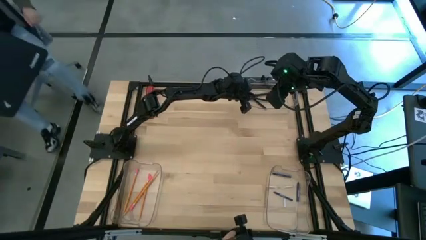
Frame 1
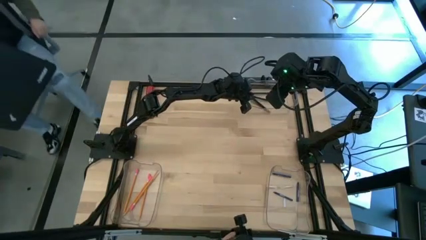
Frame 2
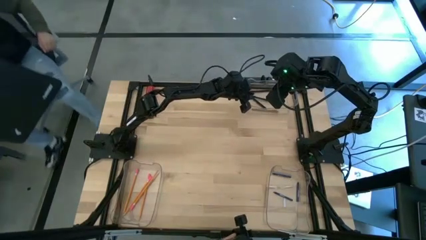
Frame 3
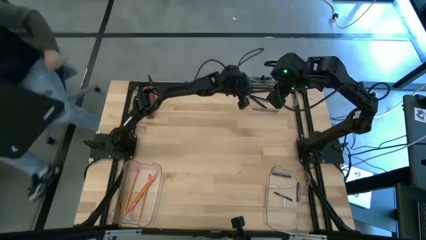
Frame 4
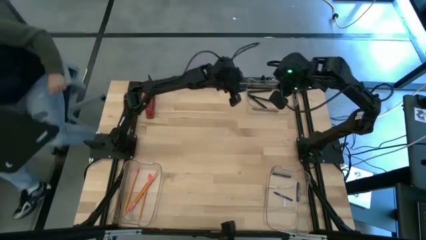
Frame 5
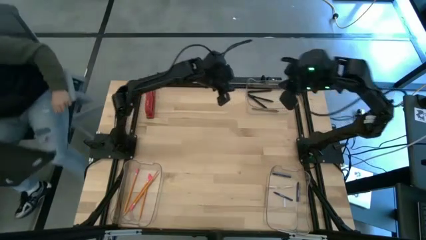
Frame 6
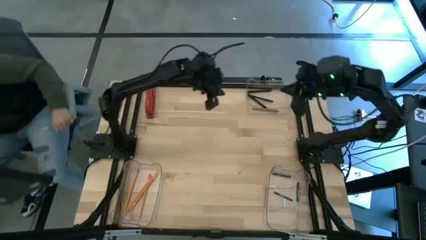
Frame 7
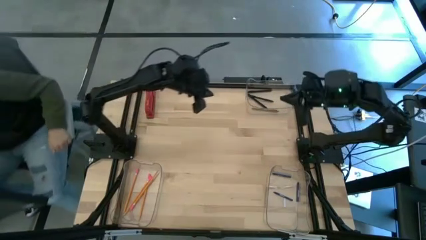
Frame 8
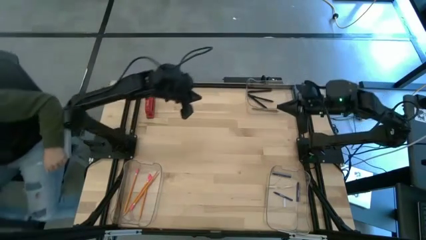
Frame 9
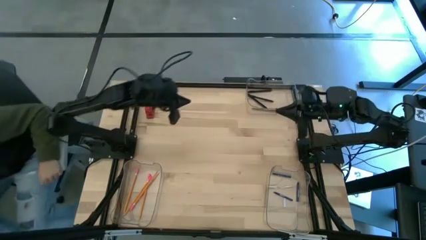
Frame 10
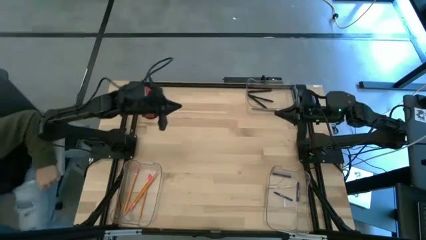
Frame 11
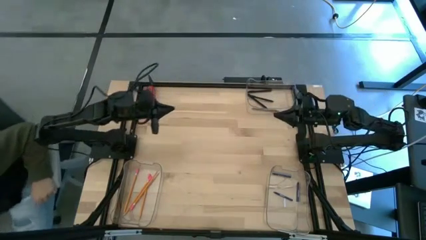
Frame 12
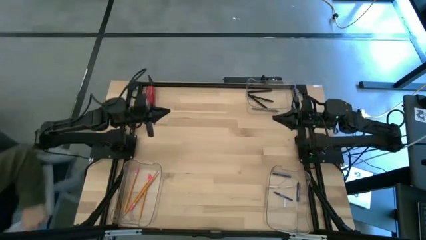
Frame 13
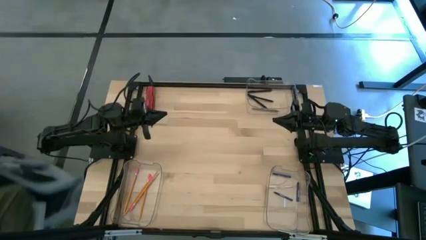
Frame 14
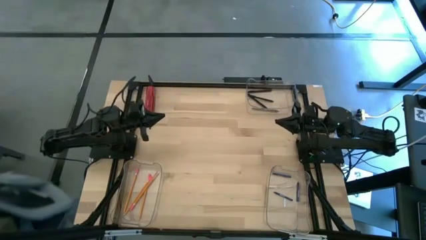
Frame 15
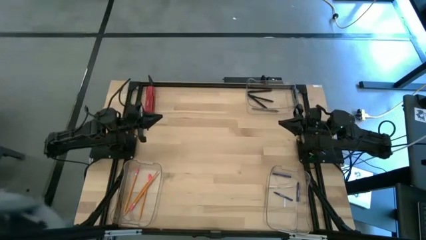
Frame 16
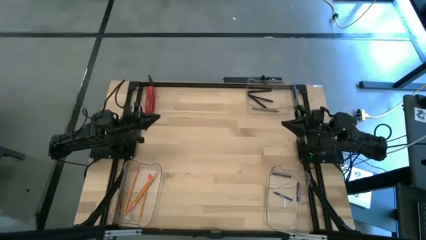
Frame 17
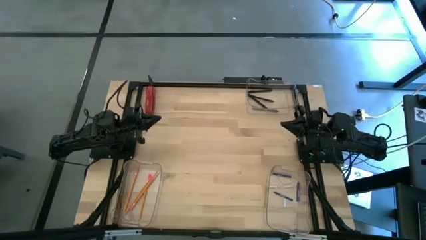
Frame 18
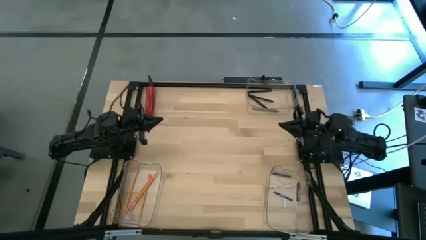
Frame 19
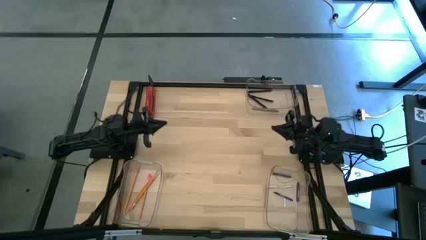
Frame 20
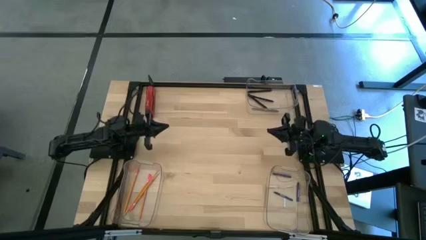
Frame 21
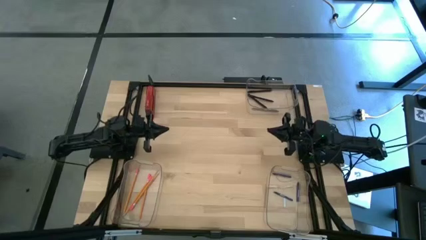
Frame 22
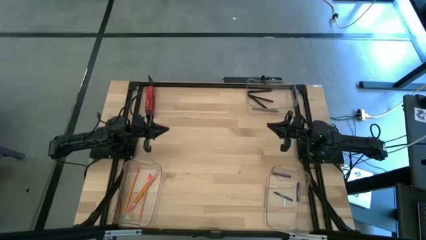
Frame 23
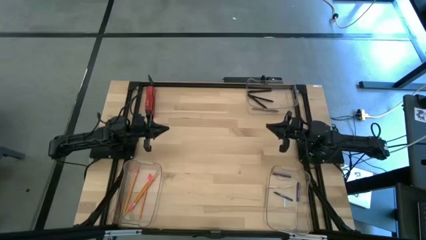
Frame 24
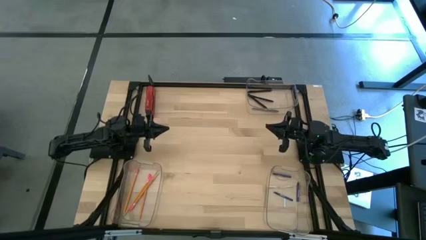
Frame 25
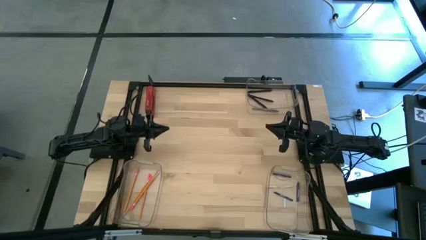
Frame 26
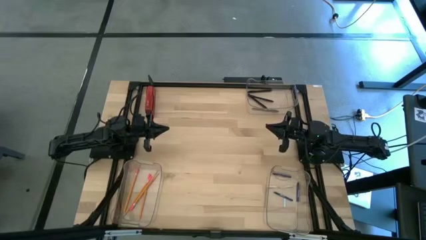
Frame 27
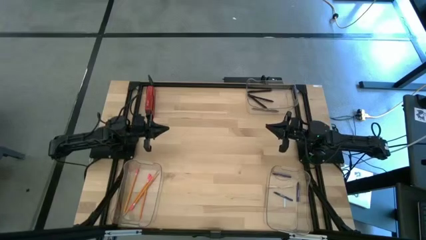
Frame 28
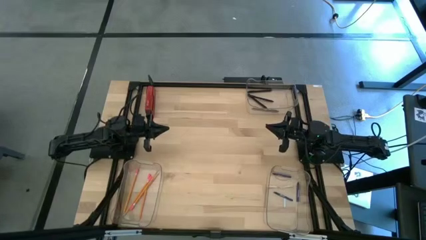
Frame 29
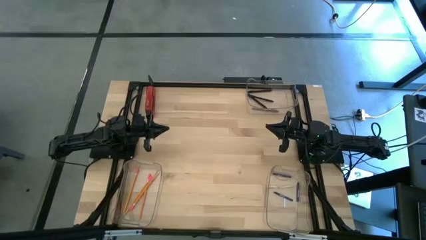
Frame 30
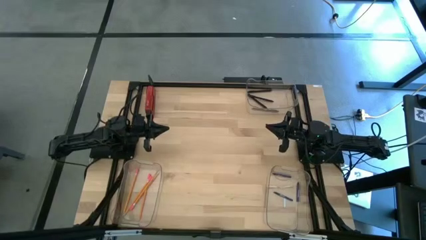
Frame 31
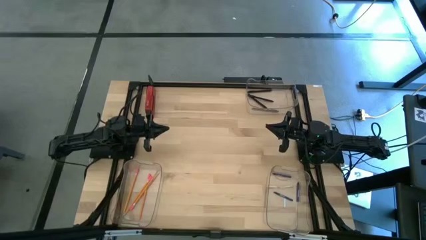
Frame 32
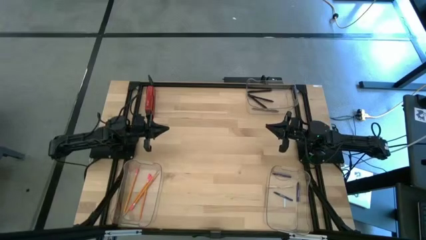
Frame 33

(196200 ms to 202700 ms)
Task: Sort crayons/erasers/pens/pencils in bins
Return to Home Position

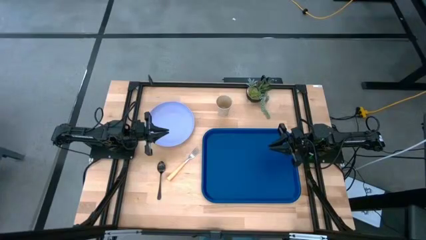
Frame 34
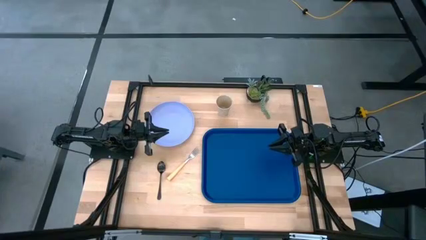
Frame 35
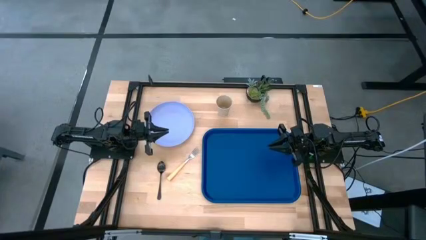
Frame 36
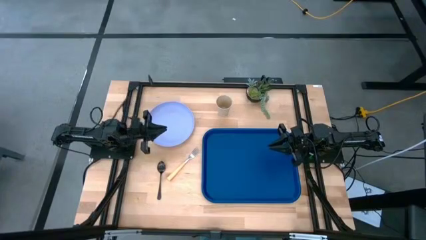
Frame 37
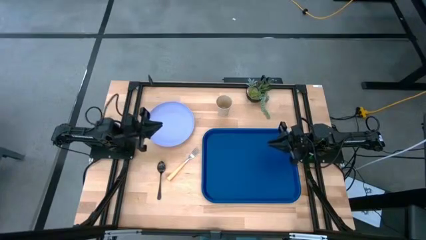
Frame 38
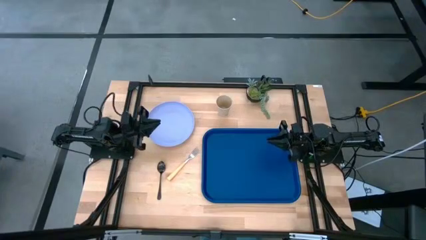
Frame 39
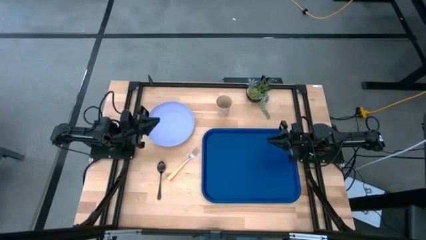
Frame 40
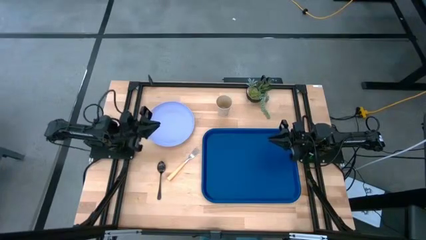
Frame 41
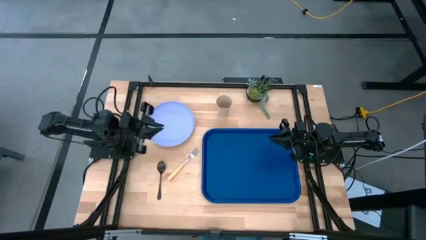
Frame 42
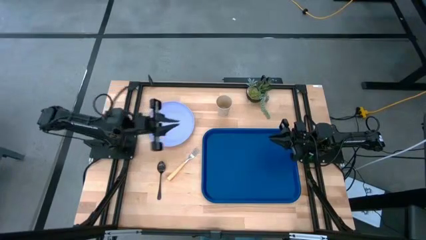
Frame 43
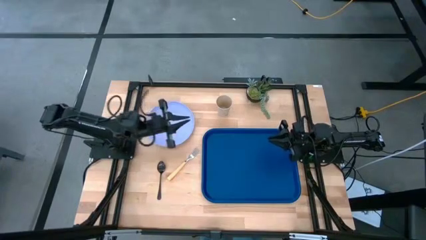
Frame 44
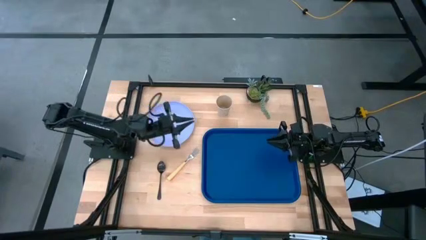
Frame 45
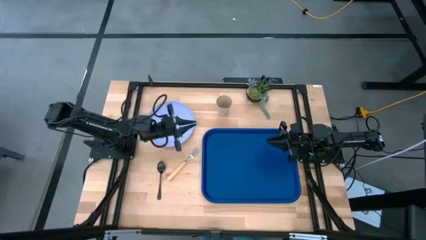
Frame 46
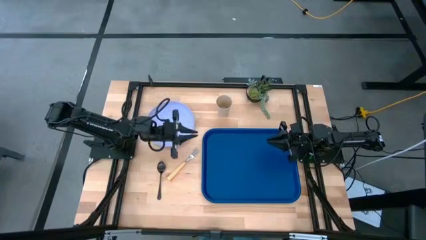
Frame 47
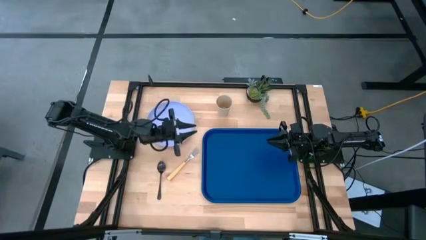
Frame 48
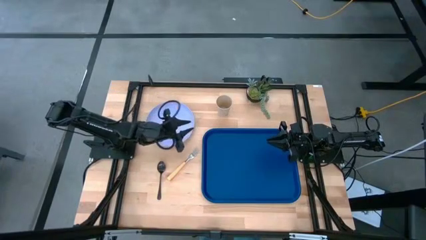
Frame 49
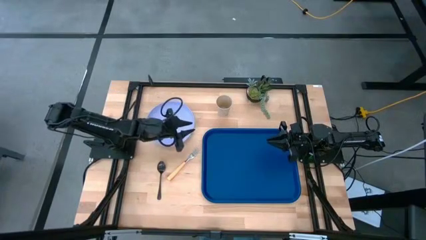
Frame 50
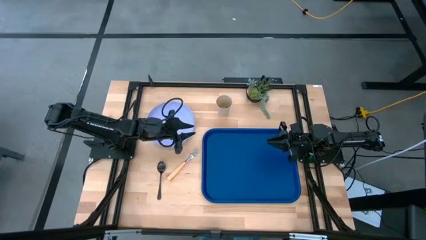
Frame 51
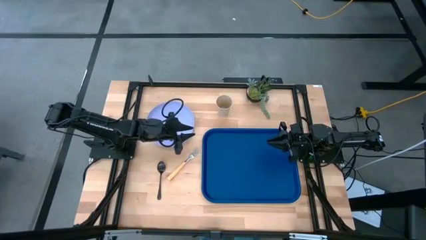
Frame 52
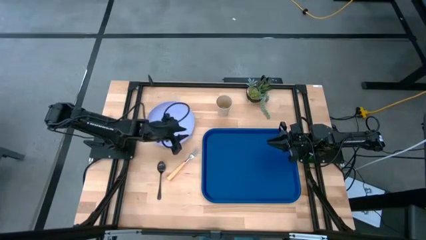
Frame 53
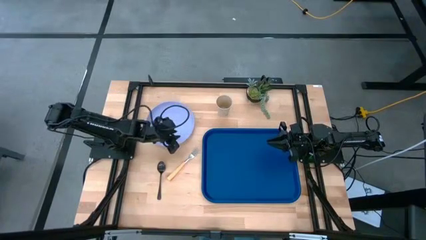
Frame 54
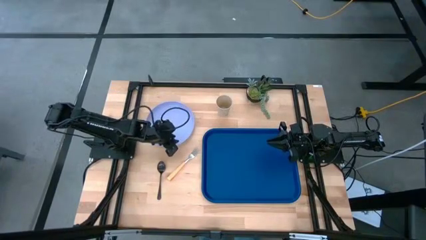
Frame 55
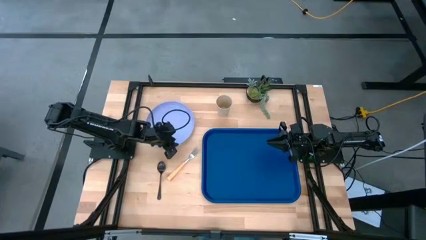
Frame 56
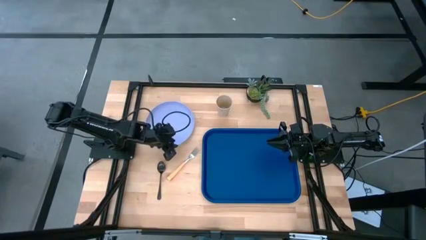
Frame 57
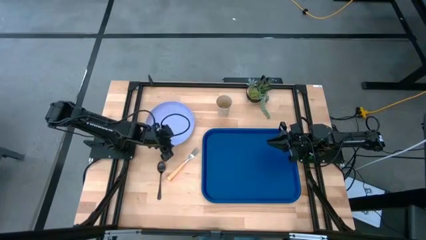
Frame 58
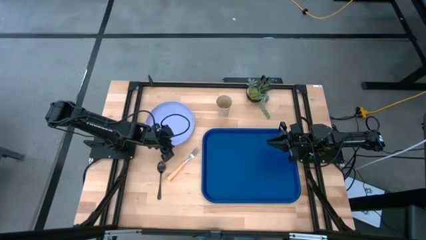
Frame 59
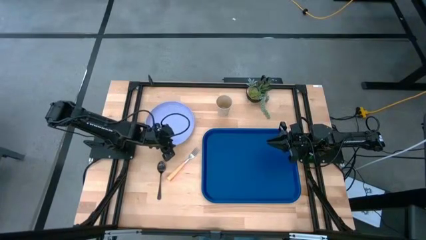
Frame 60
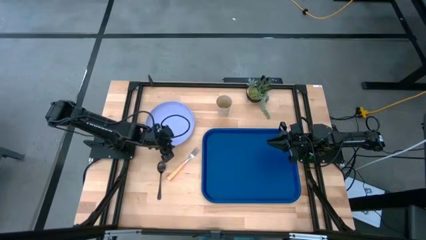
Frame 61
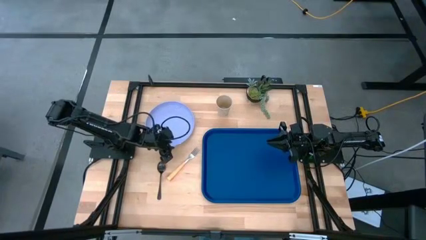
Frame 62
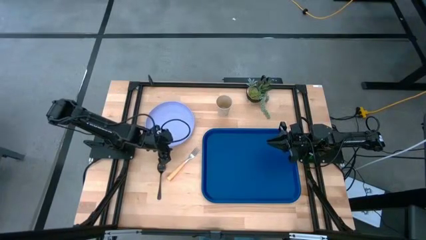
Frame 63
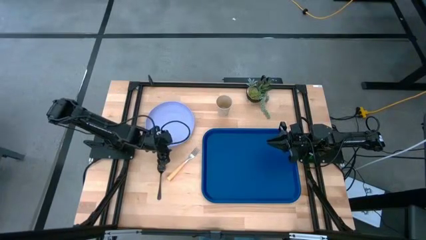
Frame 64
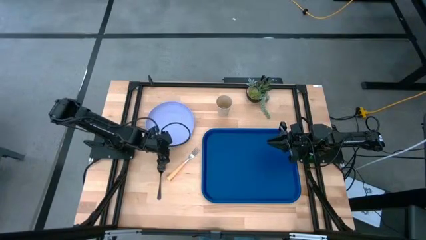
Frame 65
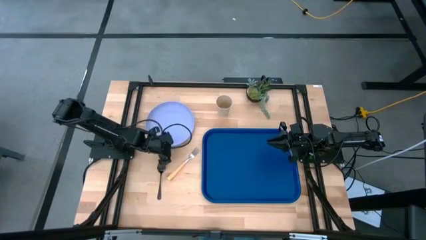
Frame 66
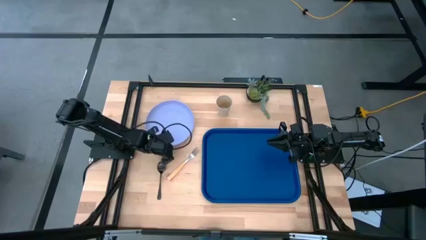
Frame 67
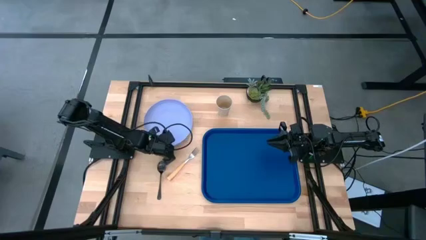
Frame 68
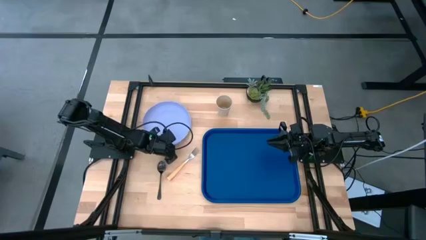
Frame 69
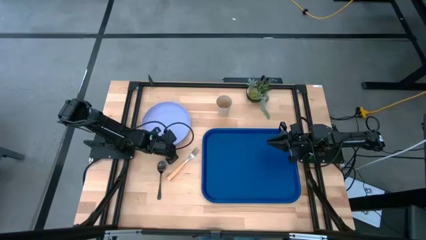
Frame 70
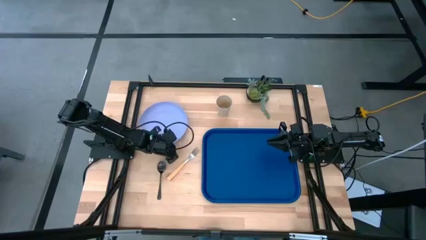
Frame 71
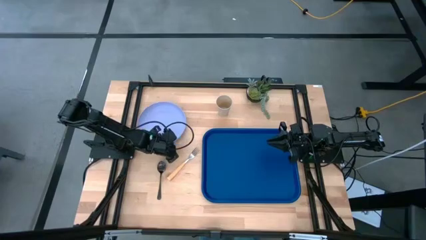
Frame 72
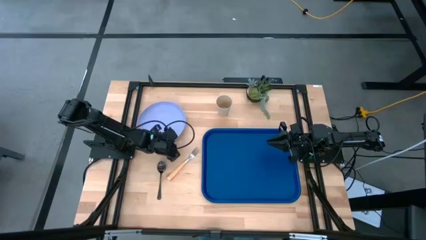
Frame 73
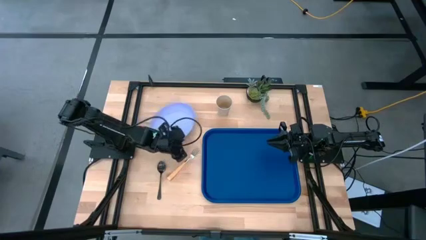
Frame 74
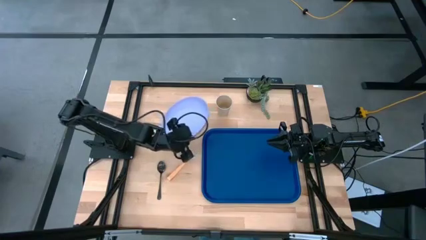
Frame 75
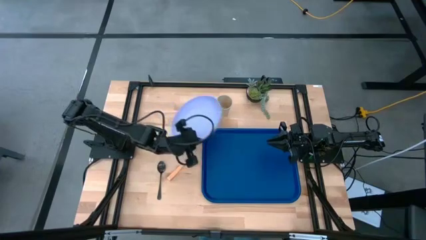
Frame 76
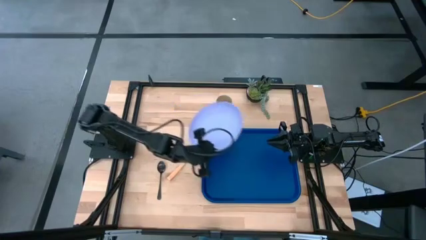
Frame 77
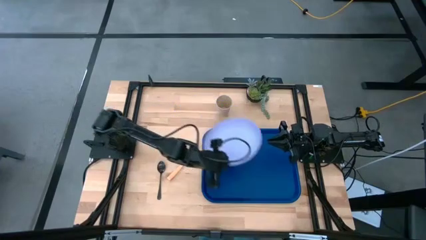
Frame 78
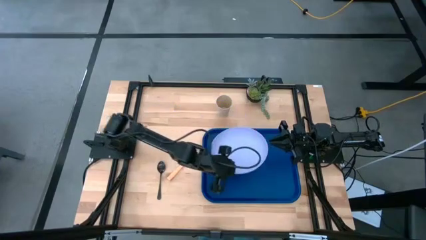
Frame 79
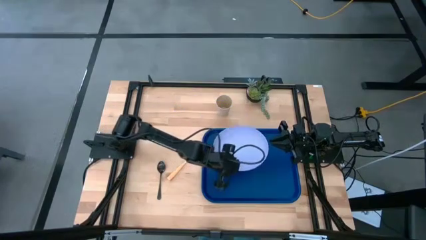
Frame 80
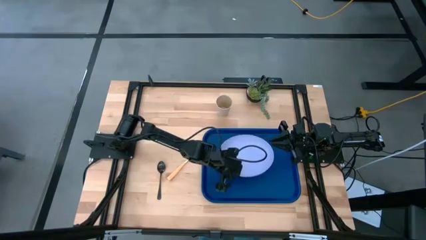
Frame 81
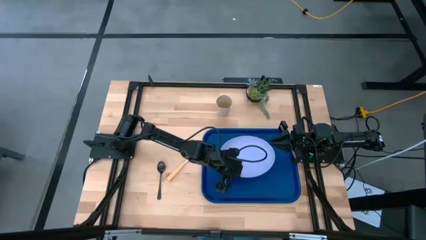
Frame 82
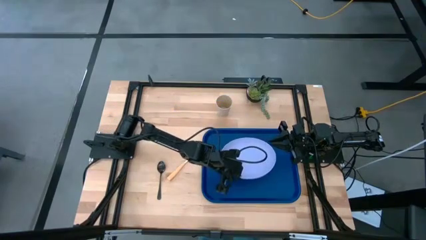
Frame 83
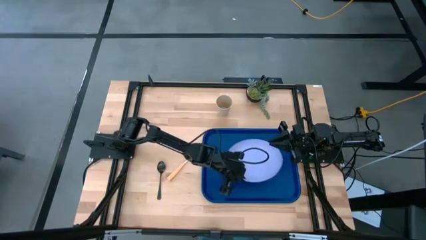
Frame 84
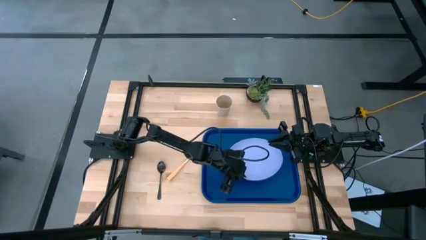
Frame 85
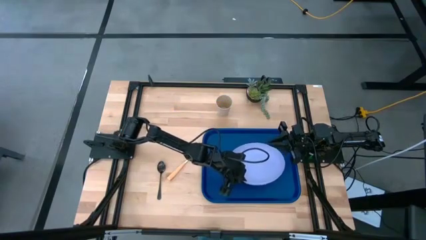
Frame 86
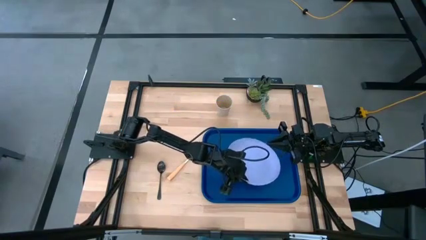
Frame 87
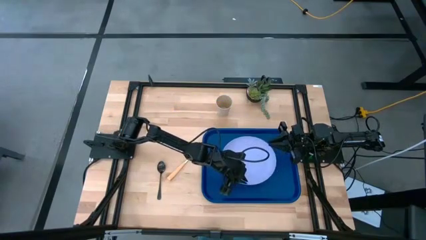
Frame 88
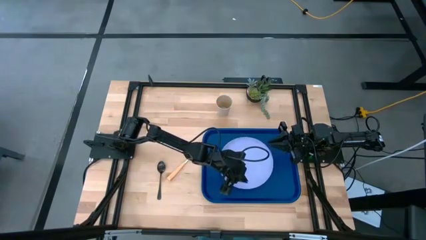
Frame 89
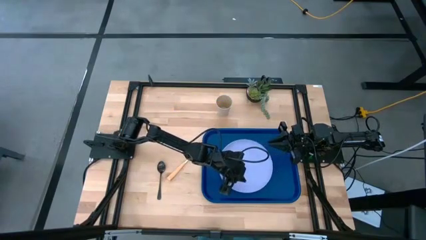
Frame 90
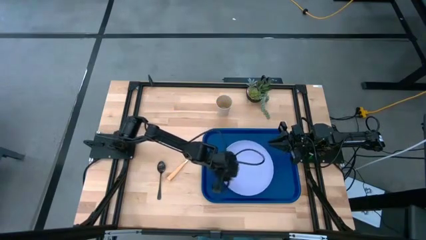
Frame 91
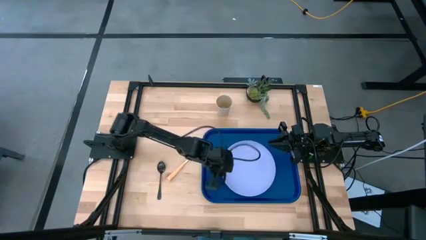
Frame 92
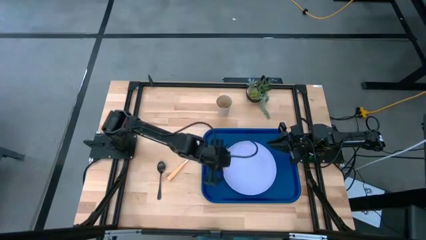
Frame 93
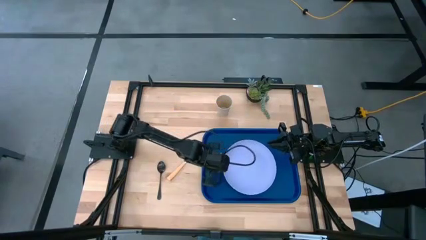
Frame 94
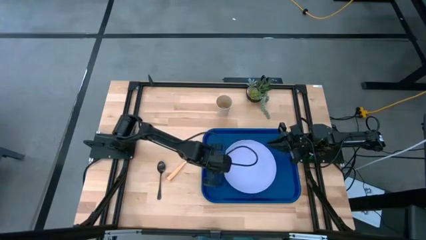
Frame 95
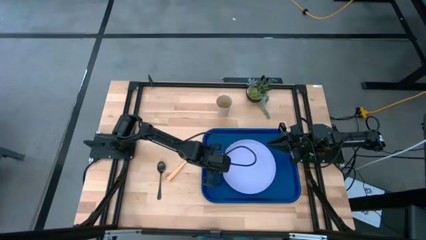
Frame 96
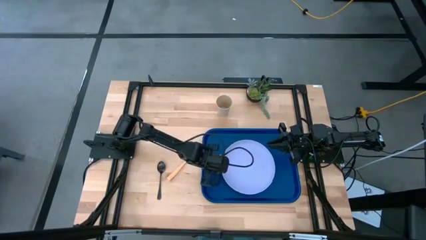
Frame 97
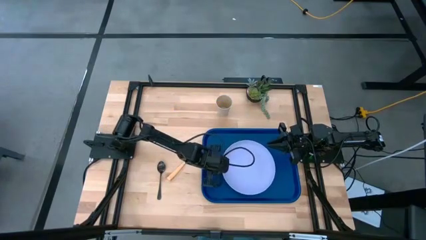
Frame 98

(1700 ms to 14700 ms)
Task: Pick and place plate/cup/fork/spoon on tray
Put the white plate on the blue serving tray
